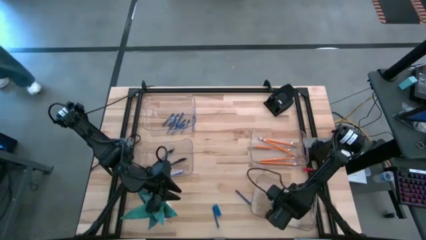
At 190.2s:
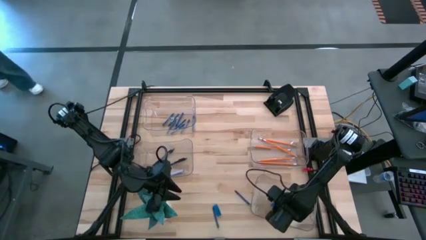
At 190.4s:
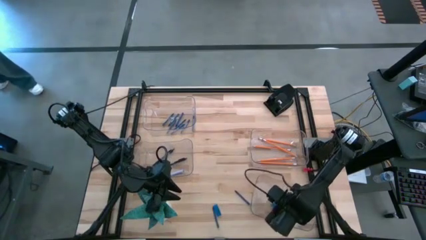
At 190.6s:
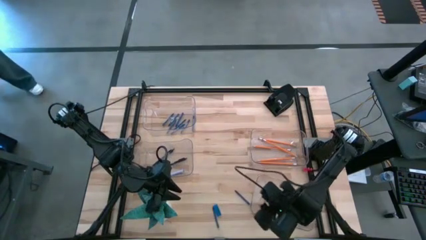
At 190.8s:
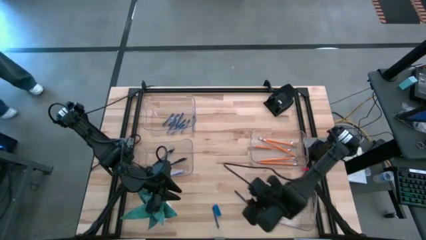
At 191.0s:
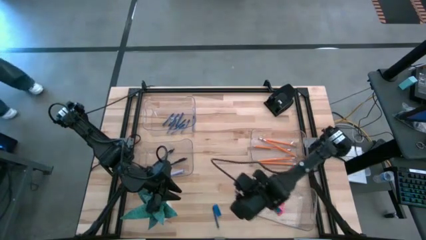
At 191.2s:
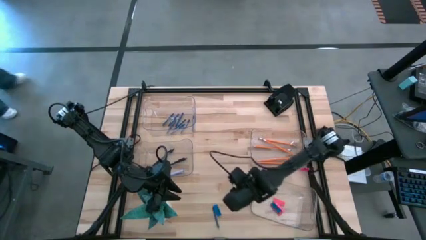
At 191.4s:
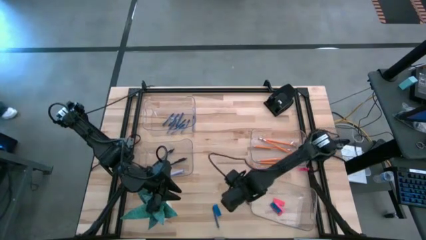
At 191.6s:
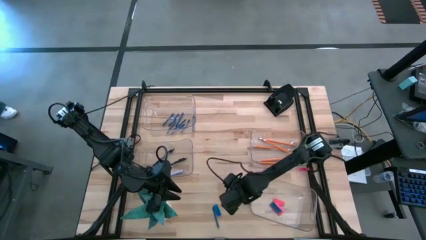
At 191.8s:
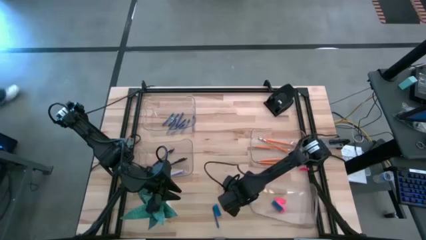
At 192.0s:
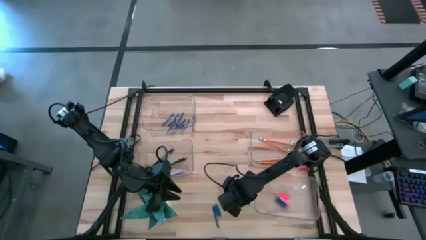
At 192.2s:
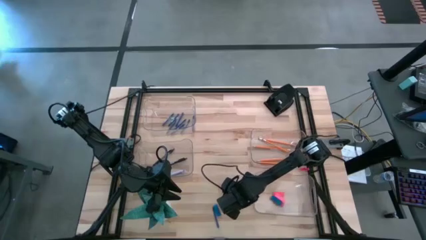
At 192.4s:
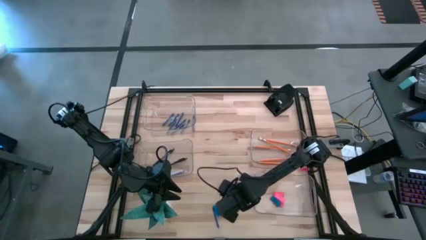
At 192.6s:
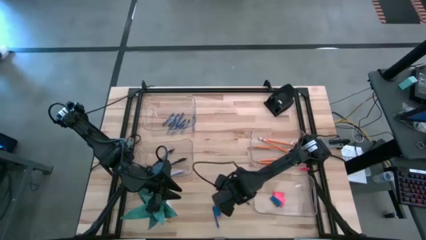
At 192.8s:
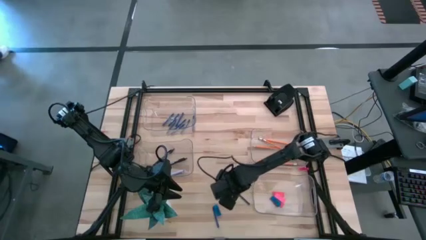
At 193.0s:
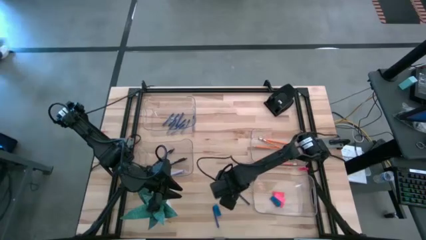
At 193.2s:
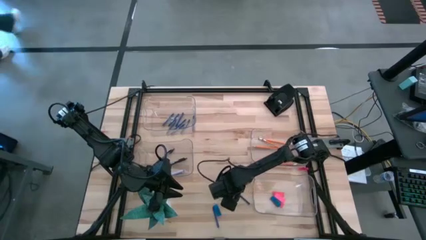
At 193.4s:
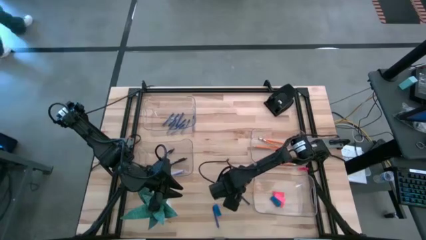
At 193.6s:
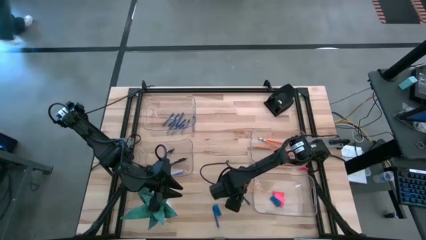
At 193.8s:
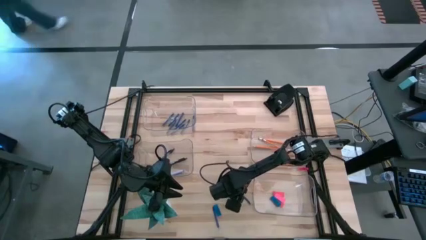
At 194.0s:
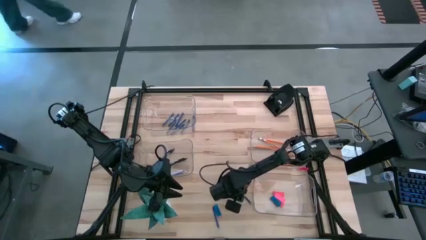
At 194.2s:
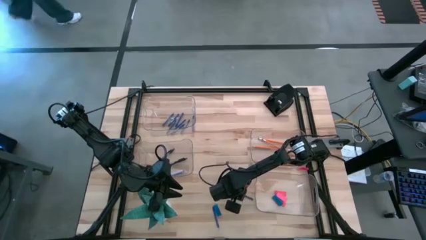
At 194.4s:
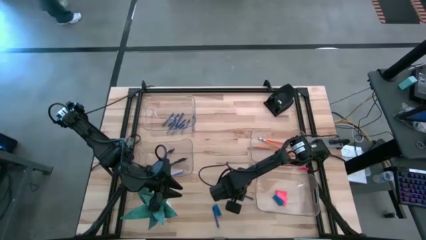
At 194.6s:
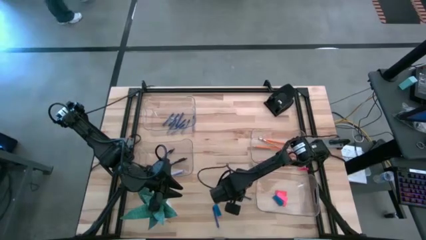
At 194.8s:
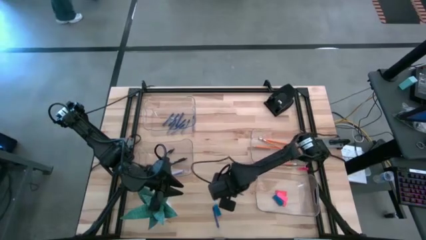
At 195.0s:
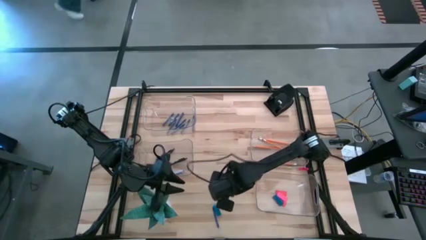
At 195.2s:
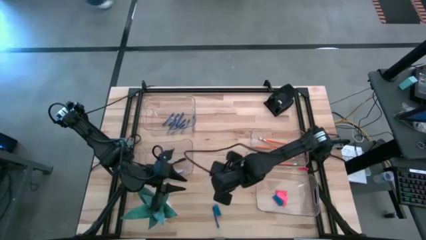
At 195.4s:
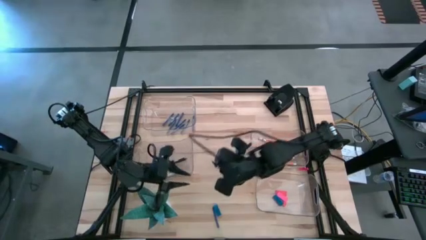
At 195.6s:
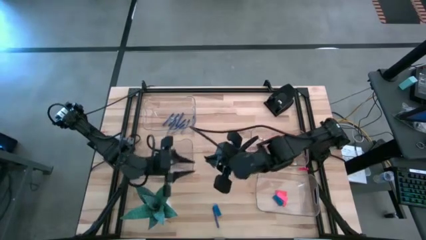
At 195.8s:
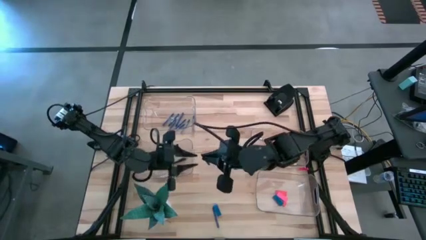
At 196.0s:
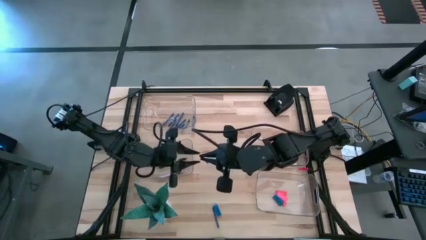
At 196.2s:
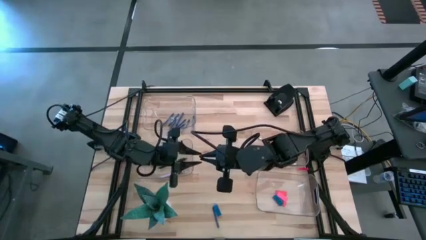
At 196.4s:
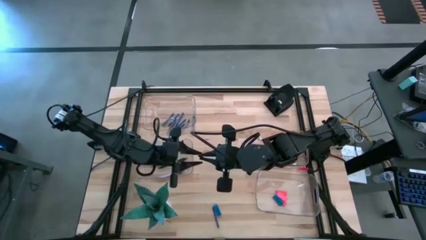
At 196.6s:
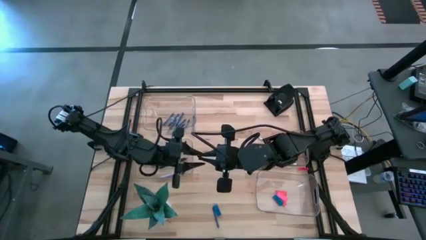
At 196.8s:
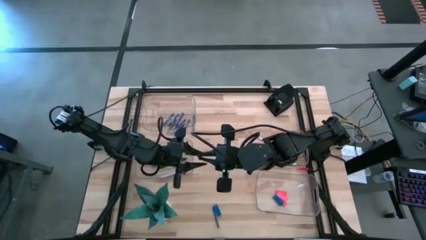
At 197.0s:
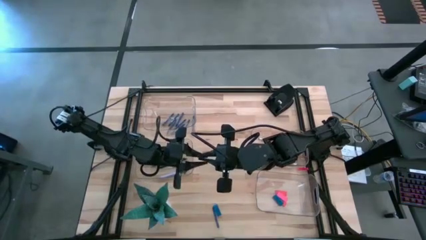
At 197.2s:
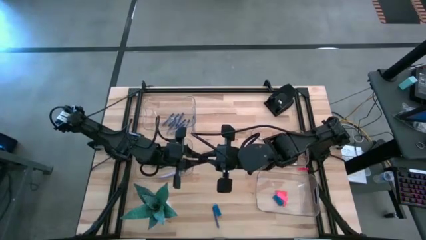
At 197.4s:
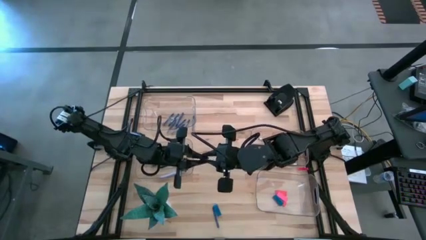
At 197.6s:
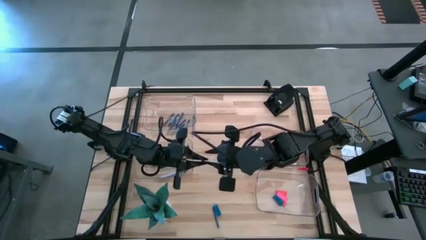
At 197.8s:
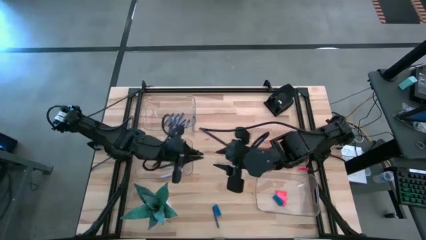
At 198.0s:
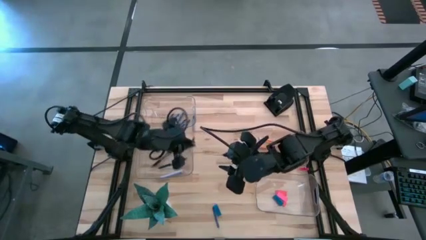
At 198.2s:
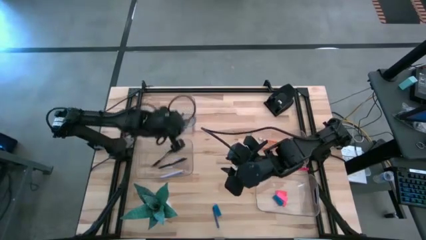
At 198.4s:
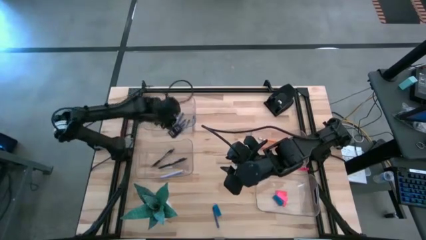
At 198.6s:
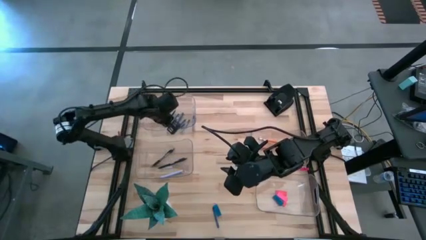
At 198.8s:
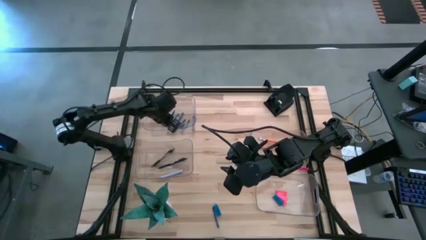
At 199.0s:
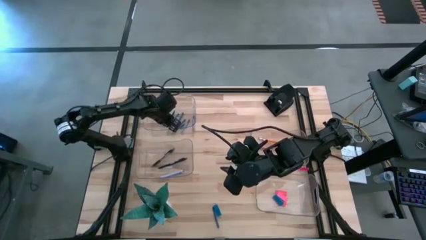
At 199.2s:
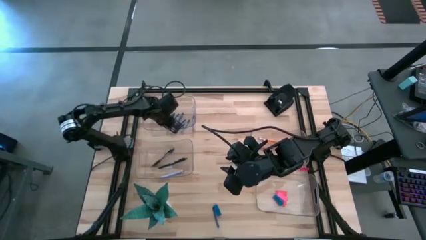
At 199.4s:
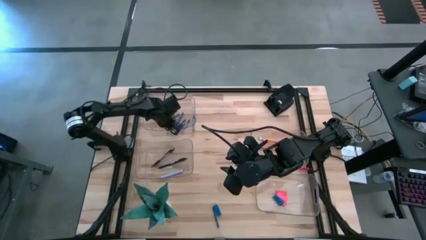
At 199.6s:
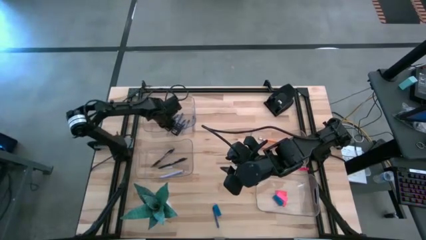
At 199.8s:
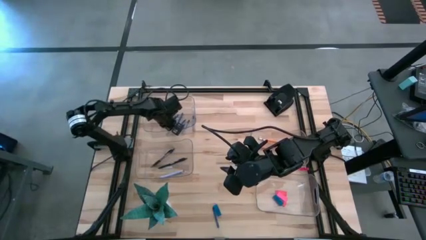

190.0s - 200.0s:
Task: Sort crayons/erasers/pens/pencils in bins
Put the blue crayon into the top transparent bin

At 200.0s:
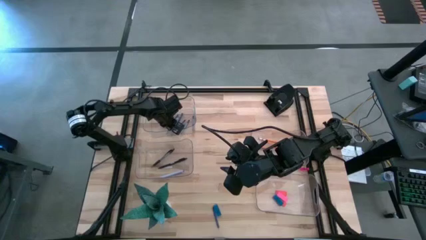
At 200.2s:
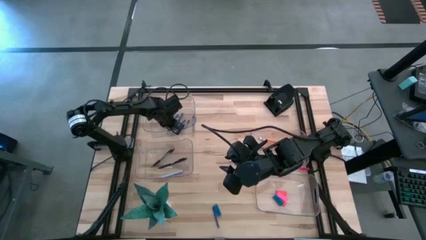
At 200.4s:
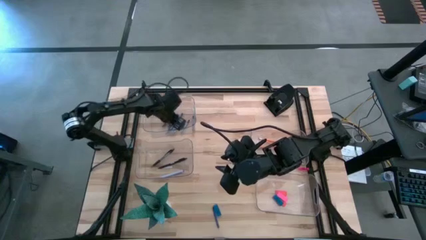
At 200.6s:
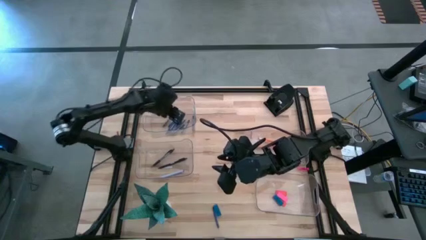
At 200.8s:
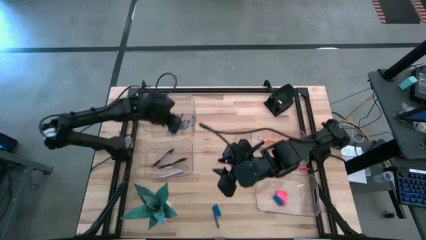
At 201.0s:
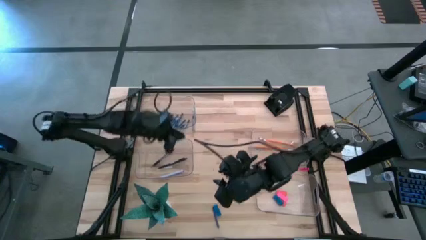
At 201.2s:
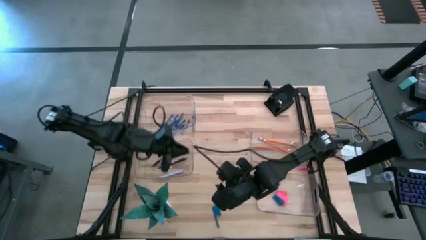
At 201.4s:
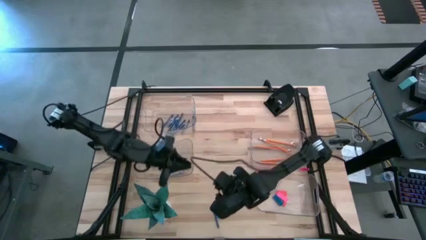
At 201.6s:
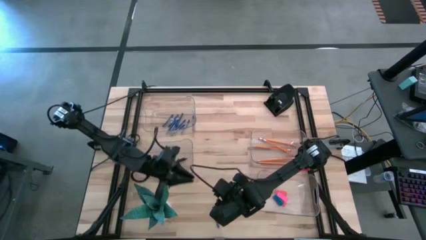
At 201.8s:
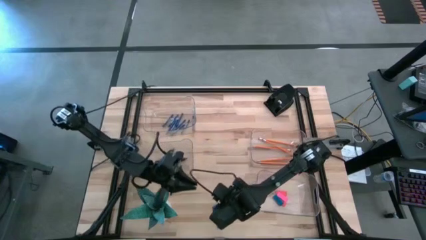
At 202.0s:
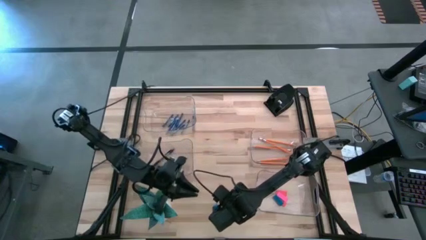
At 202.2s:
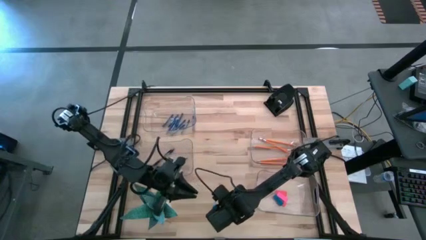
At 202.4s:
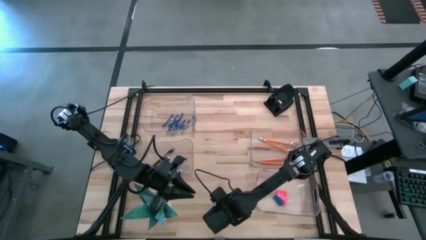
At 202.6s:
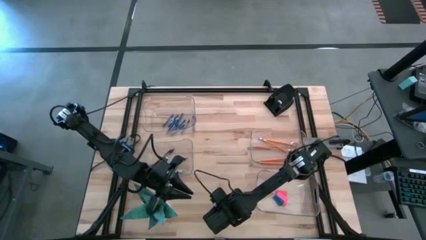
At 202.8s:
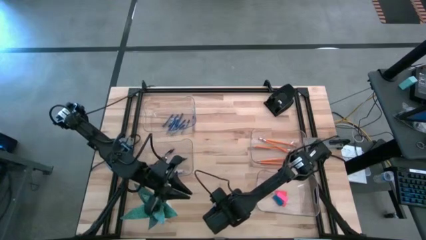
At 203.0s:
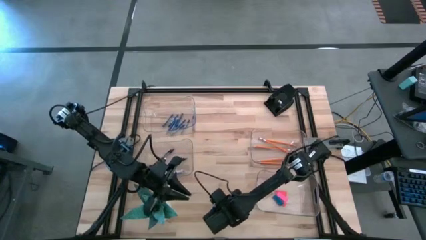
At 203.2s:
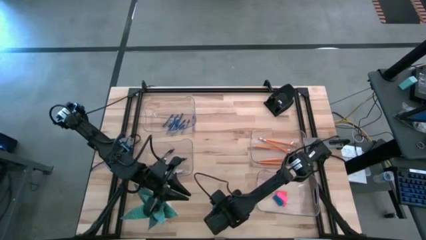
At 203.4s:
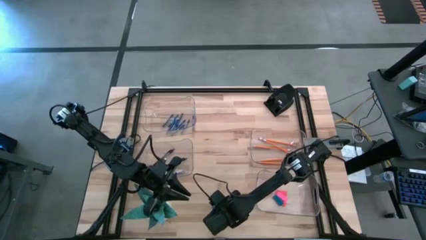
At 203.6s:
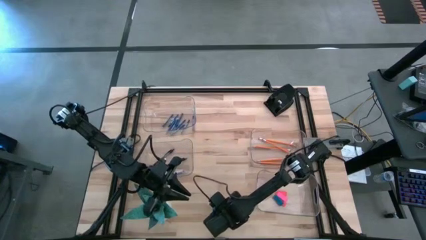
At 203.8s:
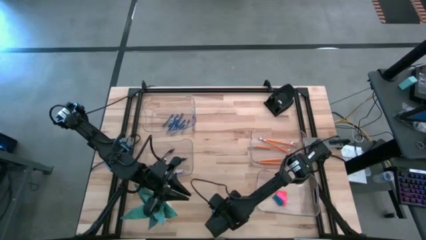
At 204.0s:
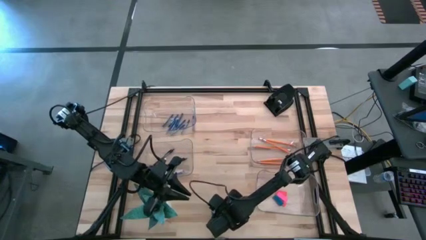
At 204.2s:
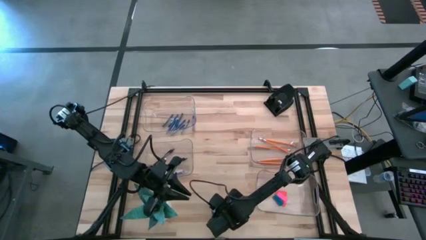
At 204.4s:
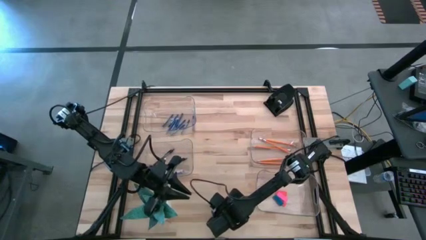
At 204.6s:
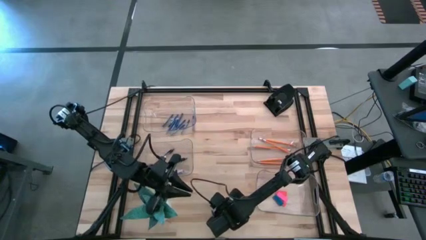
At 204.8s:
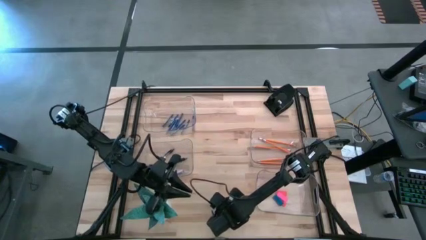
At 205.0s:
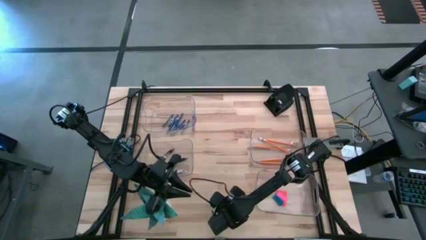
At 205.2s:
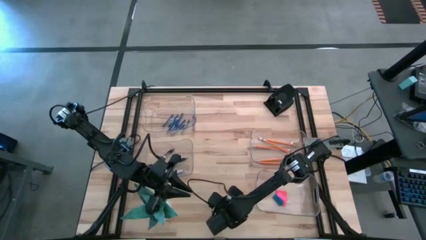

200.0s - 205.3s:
Put the blue eraser into the bottom transparent bin

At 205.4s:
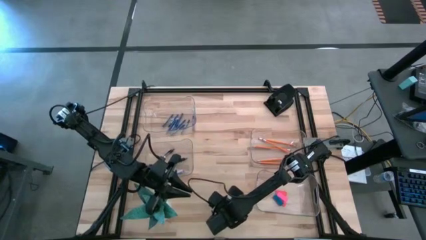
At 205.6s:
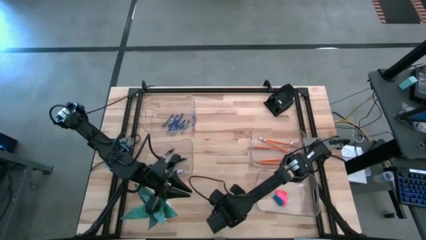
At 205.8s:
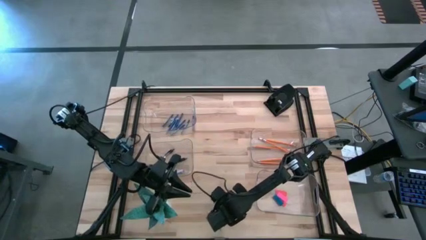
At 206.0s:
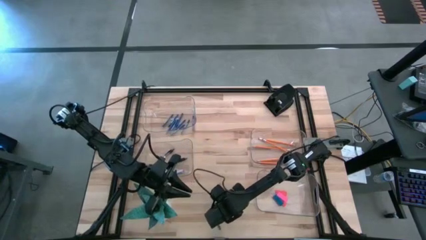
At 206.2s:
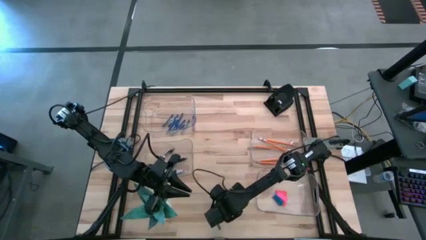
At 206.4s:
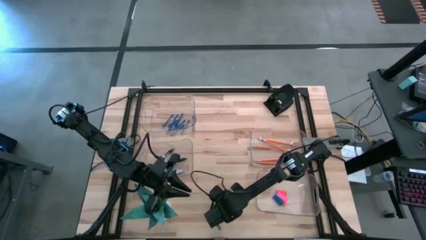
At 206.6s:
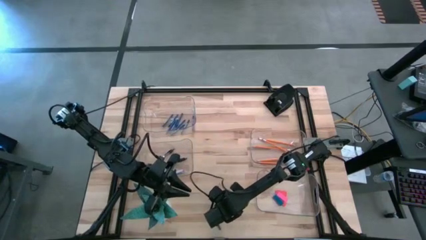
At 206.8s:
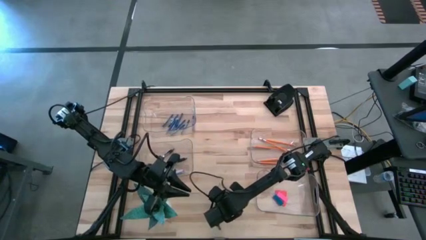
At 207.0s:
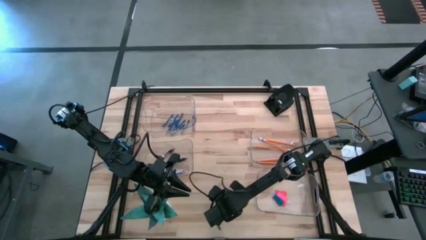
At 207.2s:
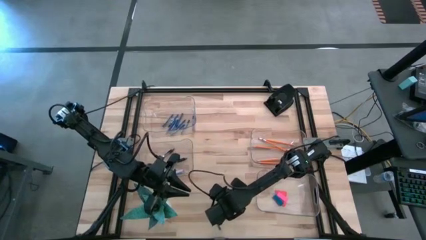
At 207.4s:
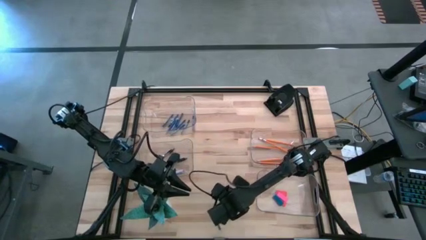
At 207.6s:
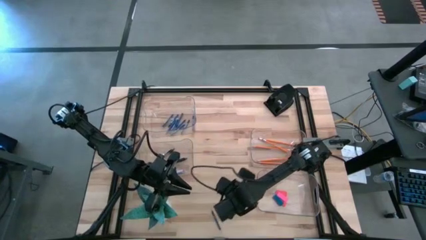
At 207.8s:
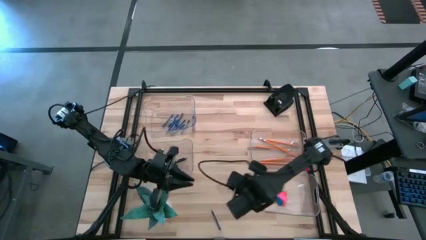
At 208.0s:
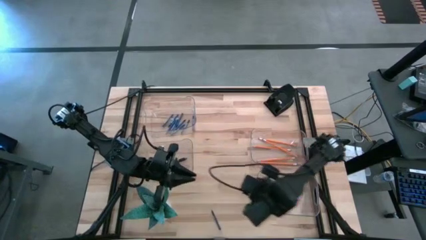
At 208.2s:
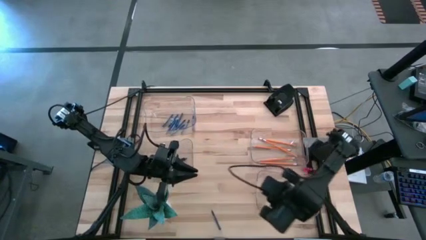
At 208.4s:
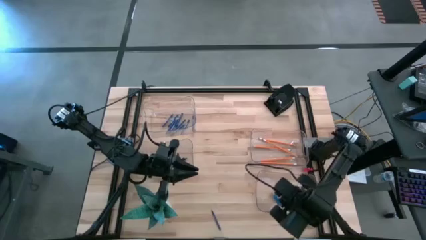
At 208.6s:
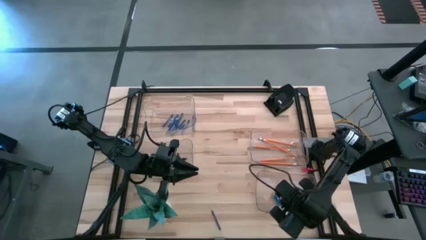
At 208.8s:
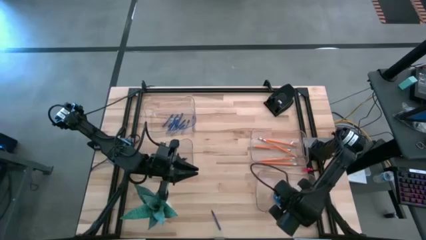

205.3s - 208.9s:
Put the blue eraser into the bottom transparent bin
